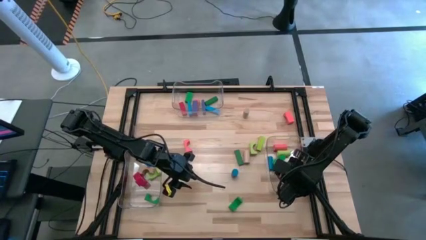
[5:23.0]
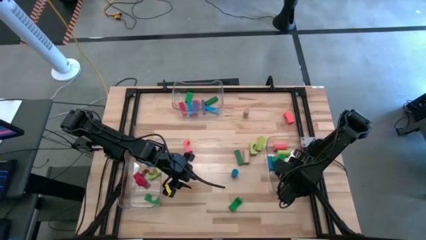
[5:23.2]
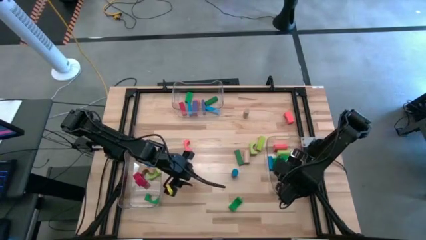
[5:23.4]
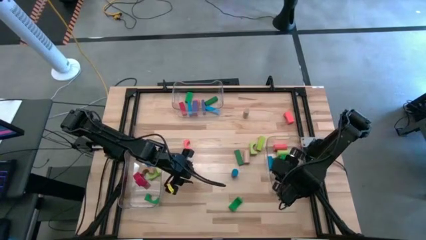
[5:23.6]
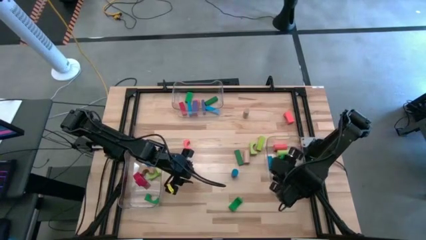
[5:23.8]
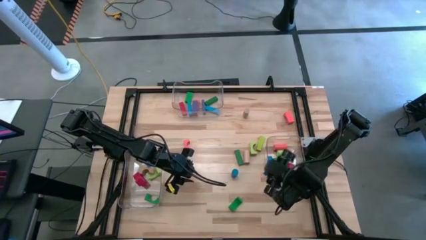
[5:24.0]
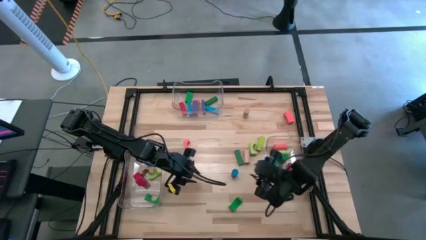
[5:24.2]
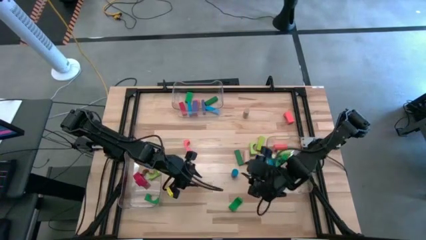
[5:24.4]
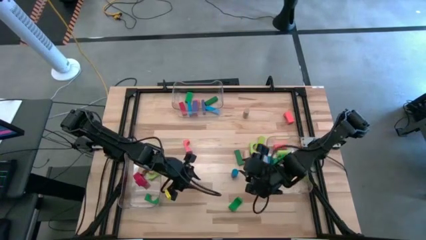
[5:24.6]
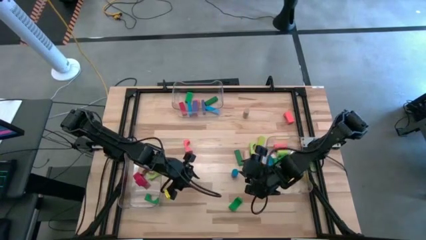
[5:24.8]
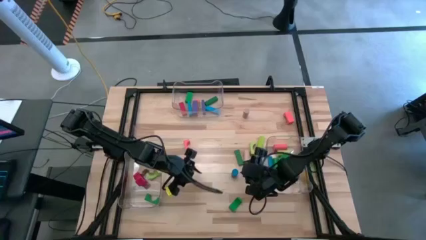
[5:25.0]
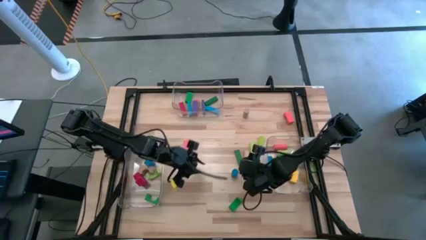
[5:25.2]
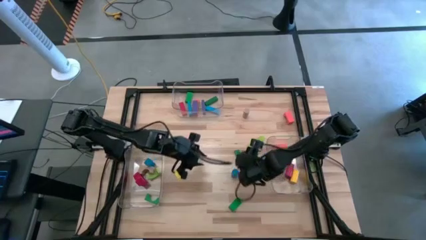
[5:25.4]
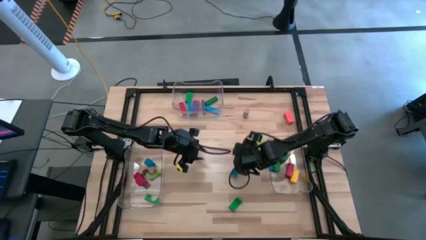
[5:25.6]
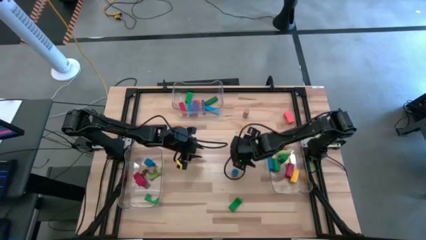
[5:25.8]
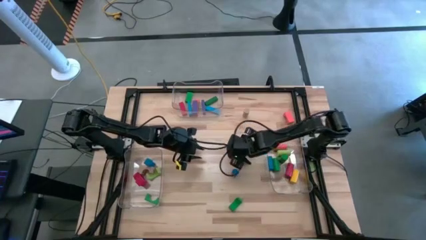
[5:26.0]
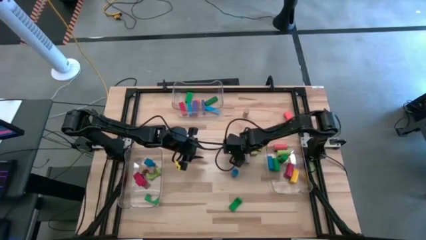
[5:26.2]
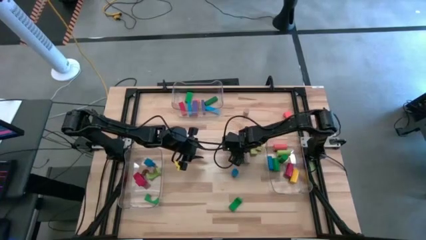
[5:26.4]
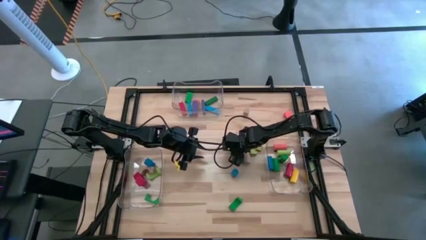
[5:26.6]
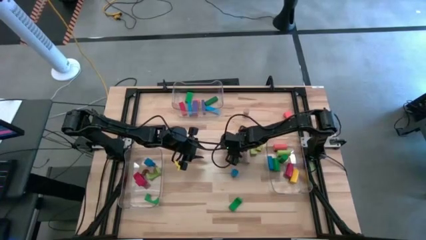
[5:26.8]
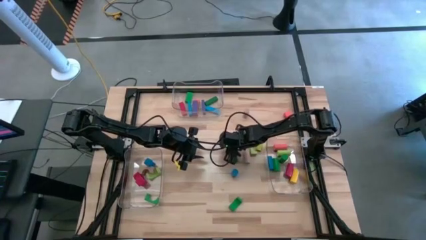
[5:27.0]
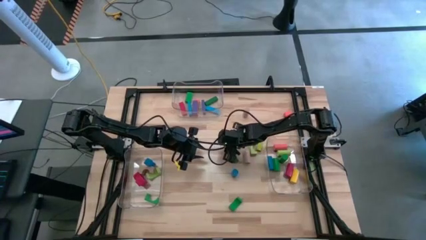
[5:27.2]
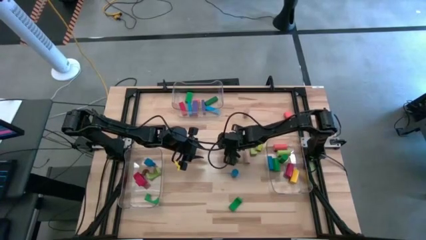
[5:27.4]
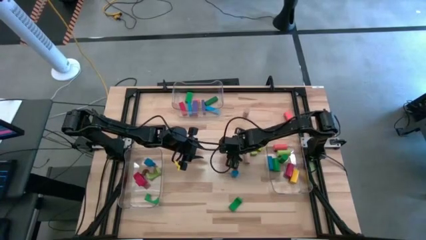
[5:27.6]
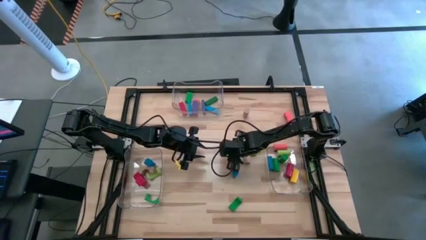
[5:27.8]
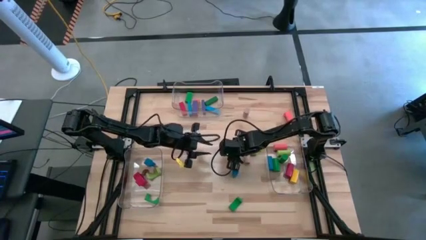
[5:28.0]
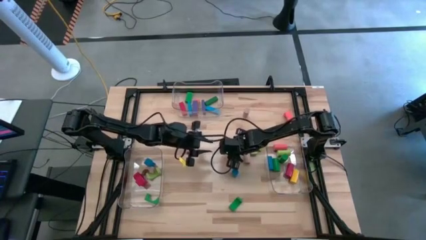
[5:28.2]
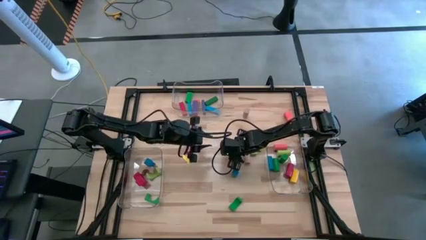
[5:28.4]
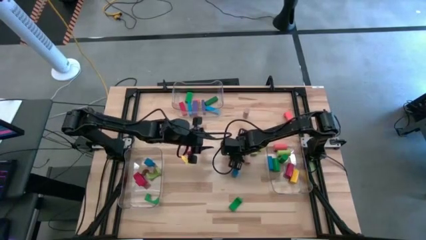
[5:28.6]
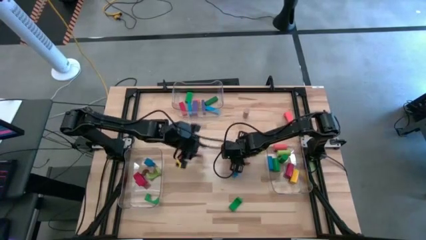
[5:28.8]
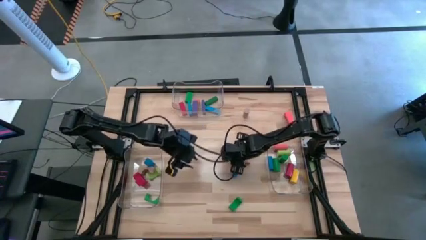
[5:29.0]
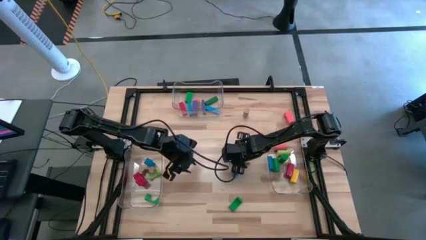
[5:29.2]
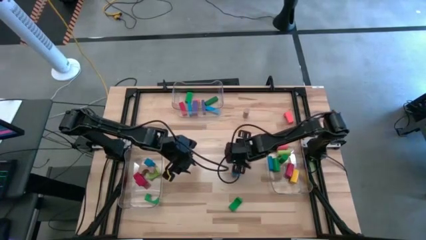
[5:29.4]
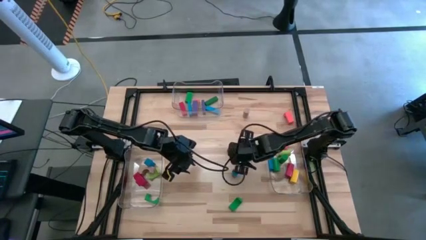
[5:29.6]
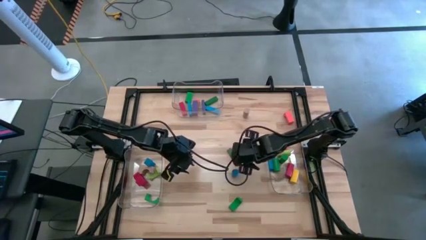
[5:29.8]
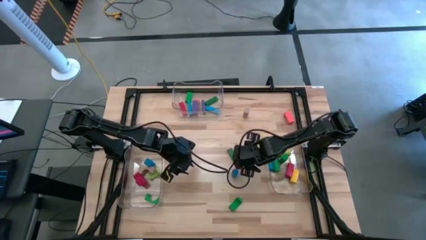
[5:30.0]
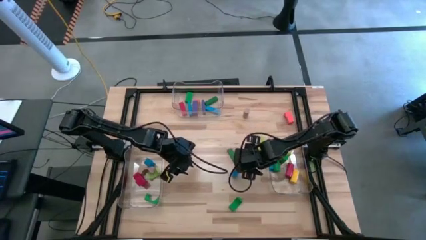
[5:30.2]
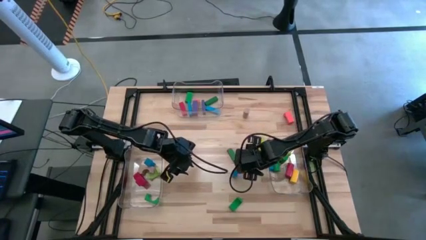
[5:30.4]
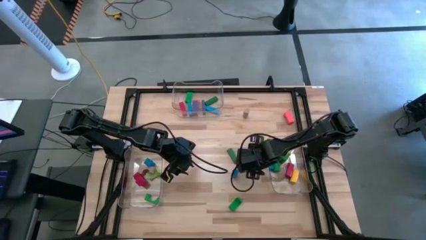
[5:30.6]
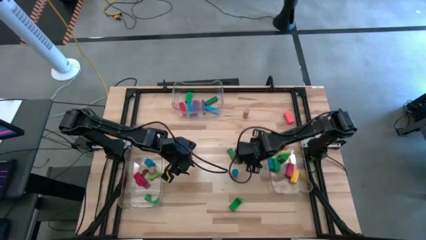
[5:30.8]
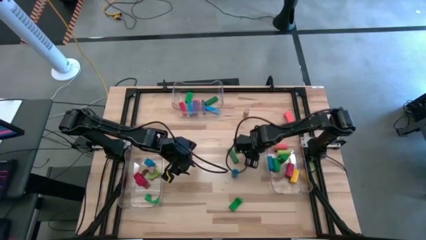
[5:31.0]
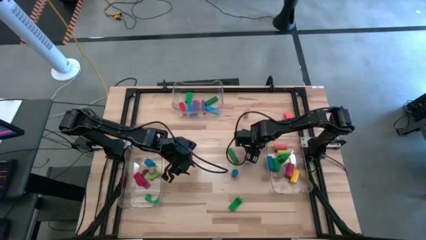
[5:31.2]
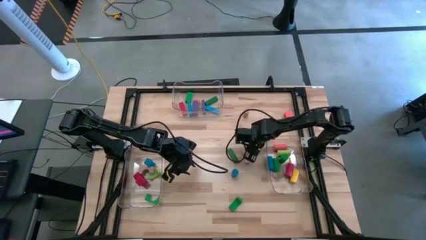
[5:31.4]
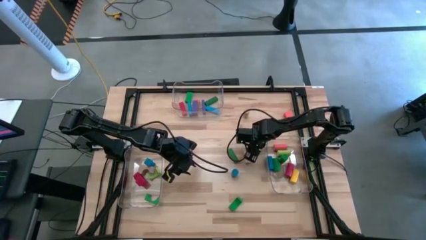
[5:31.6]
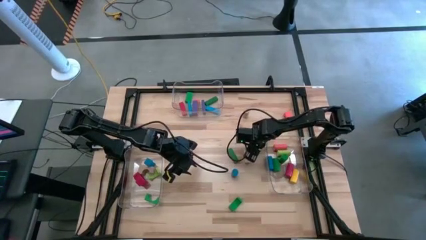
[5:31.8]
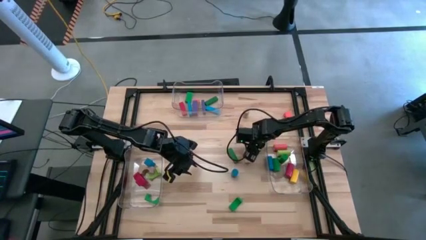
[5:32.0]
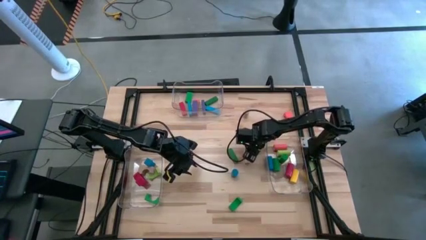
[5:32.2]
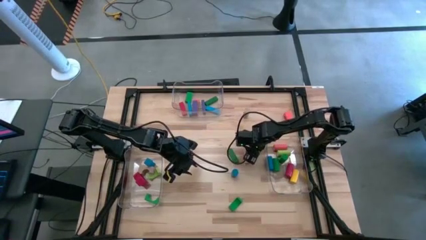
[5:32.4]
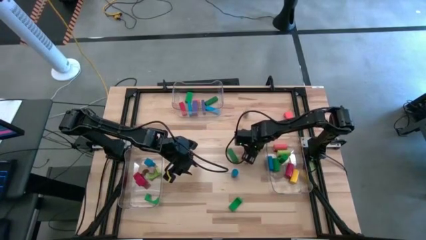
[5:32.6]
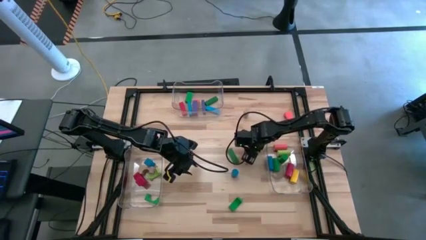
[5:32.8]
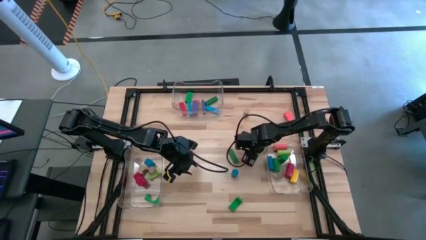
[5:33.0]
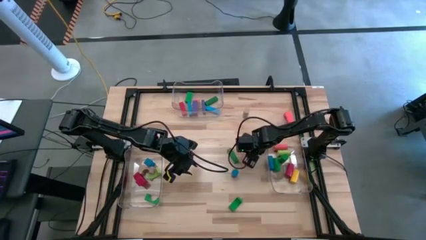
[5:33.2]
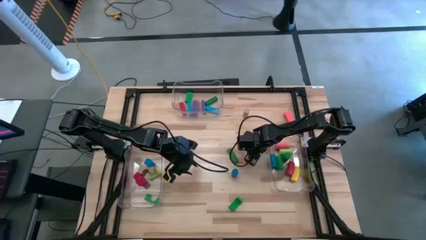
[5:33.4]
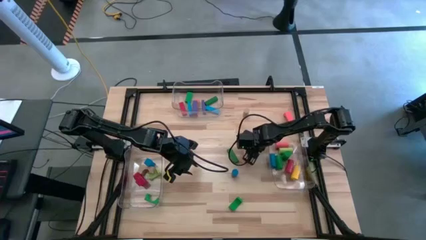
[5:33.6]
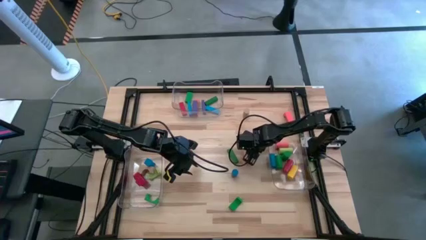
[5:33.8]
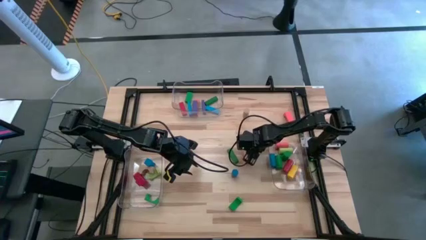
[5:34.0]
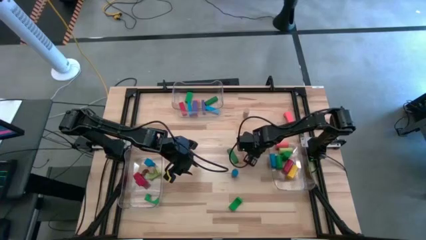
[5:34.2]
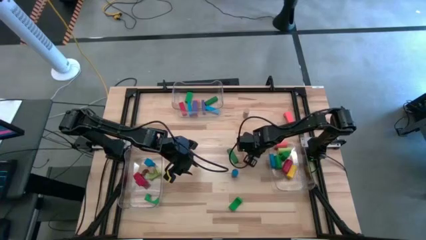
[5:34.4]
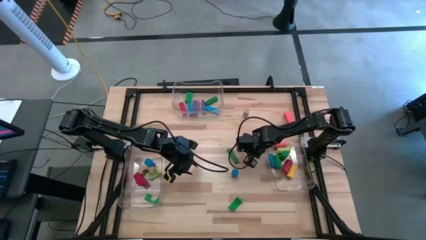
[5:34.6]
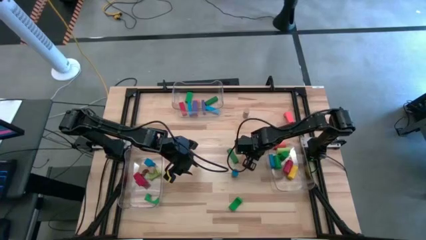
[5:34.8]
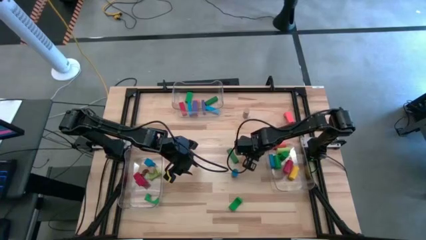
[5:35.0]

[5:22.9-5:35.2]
Task: Sort blocks by size
Put the light green arc block into the left transparent bin
